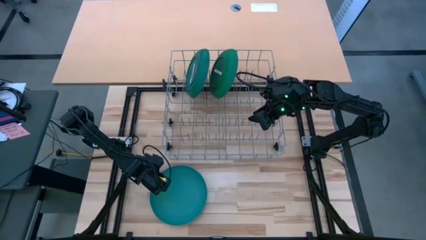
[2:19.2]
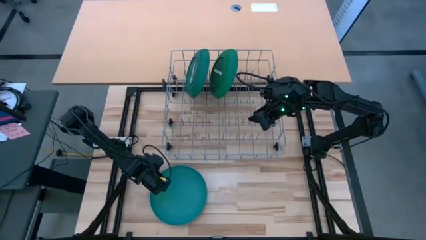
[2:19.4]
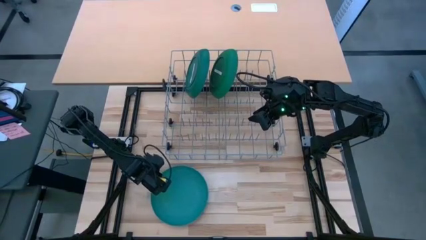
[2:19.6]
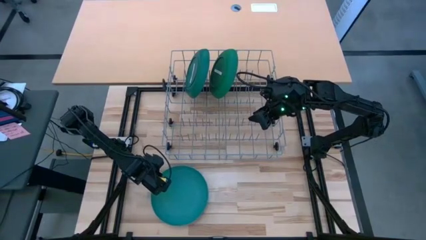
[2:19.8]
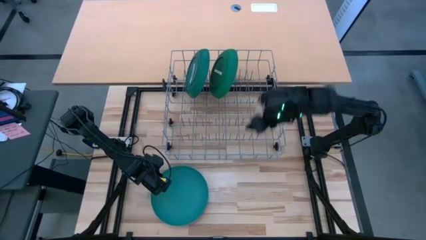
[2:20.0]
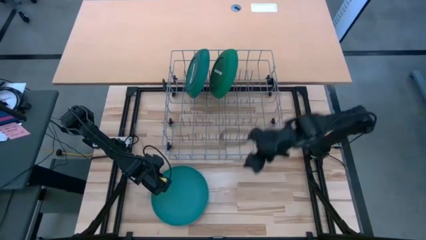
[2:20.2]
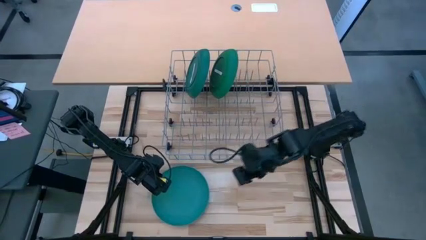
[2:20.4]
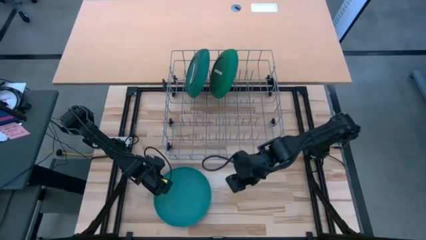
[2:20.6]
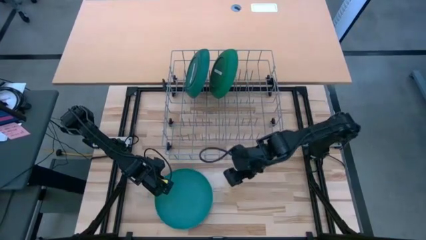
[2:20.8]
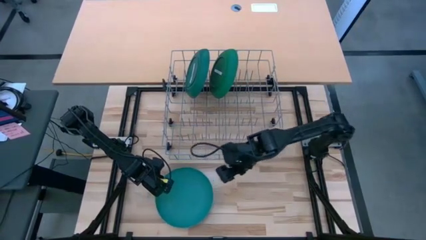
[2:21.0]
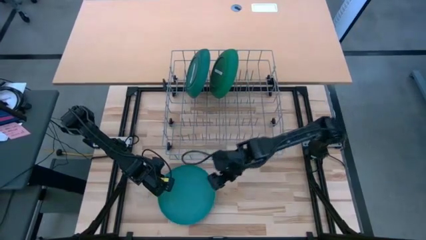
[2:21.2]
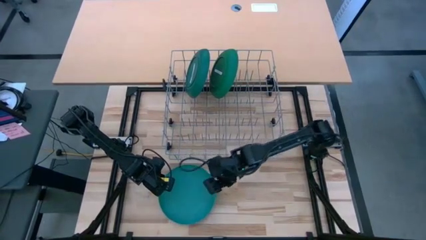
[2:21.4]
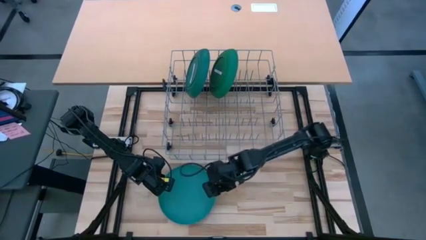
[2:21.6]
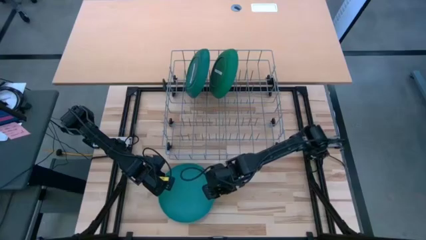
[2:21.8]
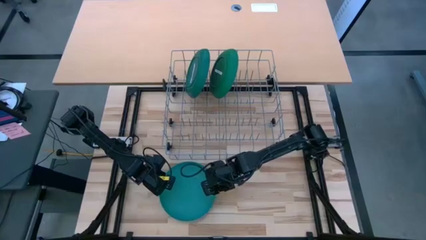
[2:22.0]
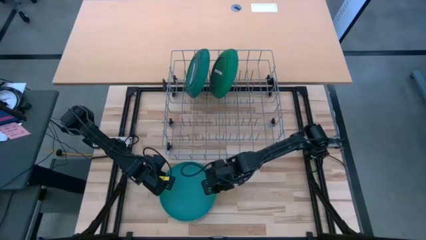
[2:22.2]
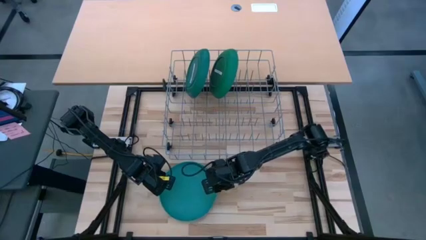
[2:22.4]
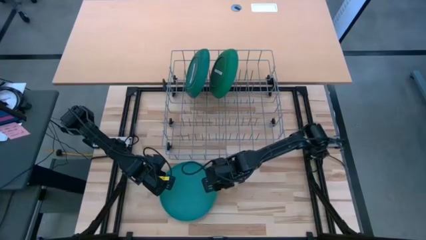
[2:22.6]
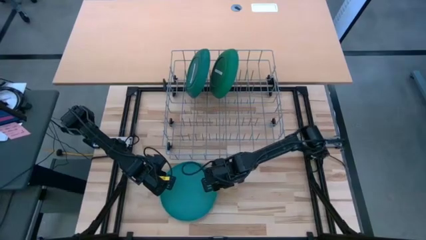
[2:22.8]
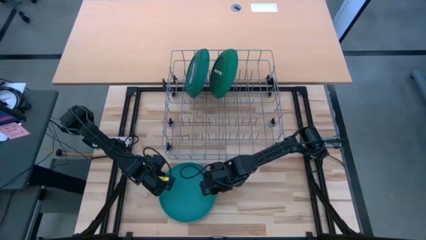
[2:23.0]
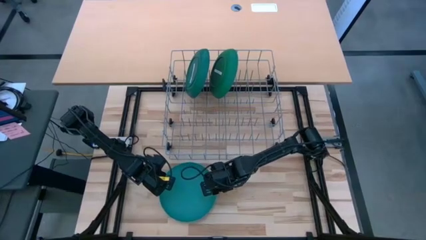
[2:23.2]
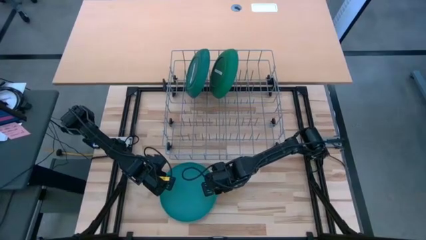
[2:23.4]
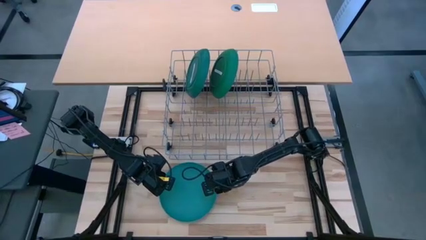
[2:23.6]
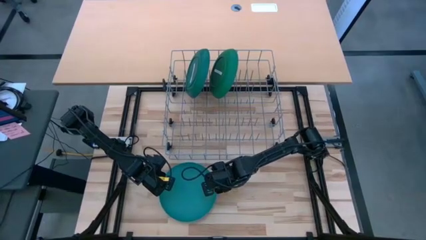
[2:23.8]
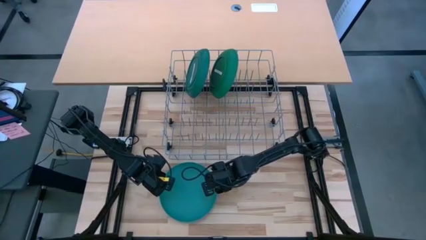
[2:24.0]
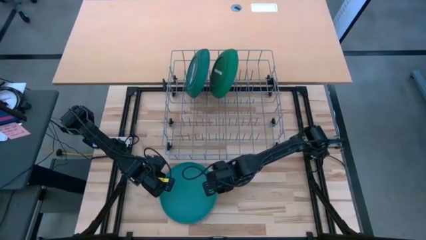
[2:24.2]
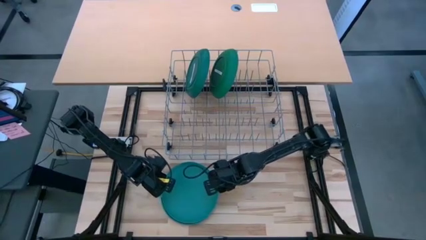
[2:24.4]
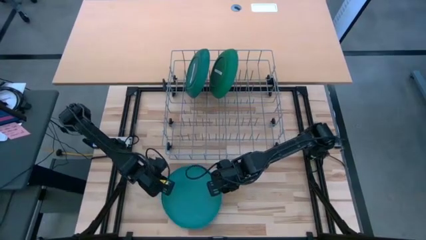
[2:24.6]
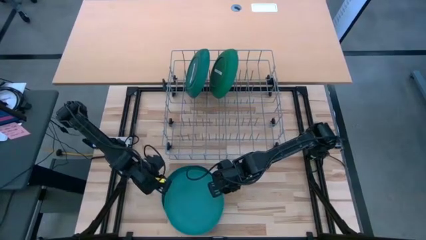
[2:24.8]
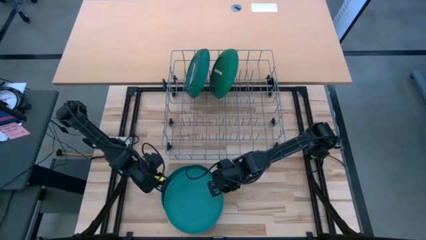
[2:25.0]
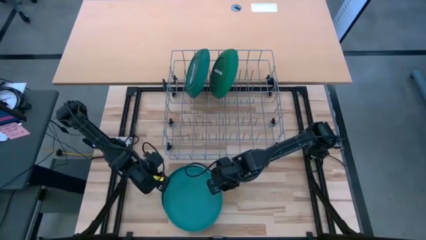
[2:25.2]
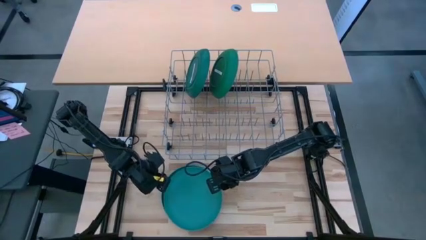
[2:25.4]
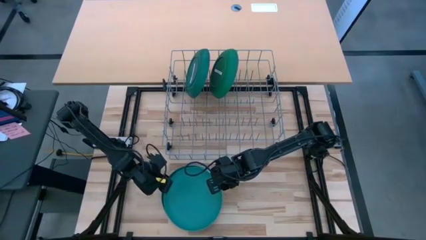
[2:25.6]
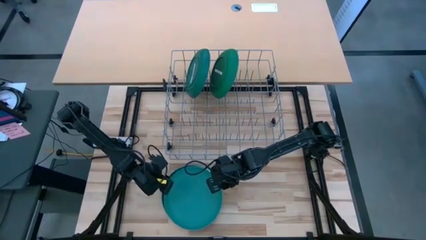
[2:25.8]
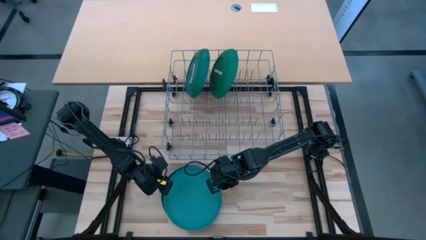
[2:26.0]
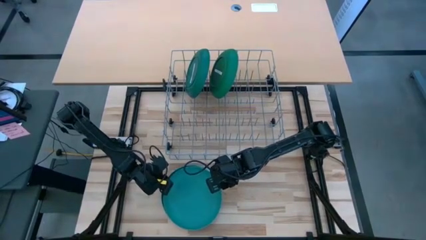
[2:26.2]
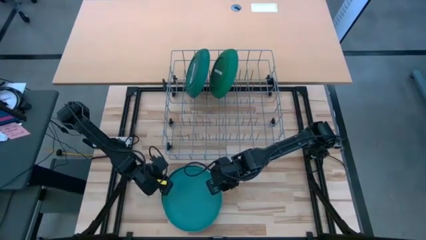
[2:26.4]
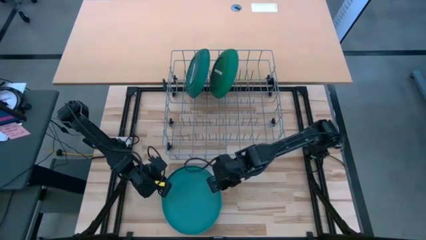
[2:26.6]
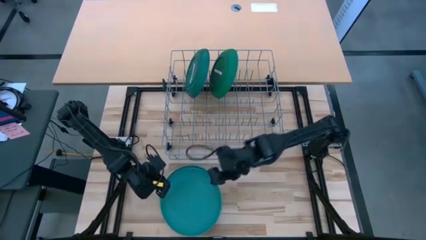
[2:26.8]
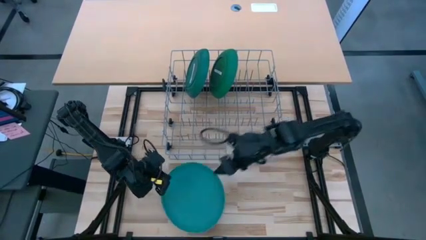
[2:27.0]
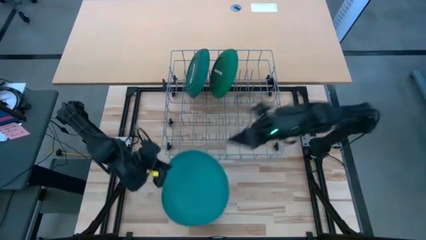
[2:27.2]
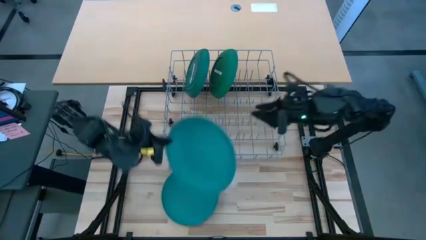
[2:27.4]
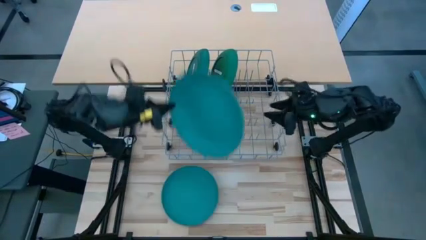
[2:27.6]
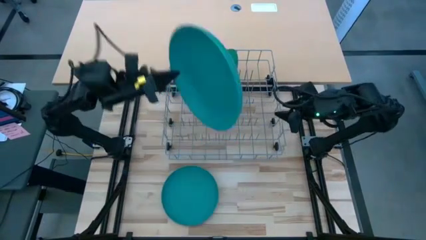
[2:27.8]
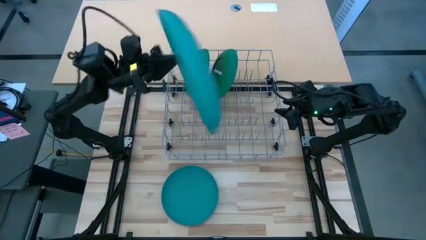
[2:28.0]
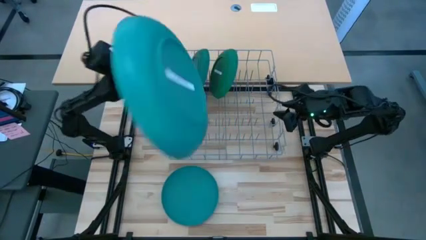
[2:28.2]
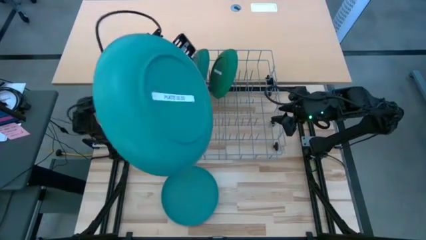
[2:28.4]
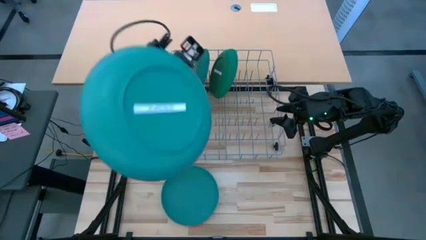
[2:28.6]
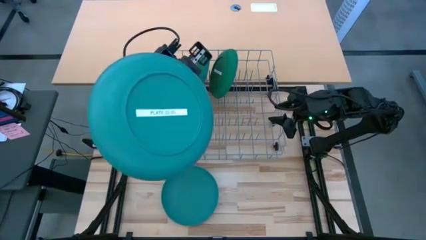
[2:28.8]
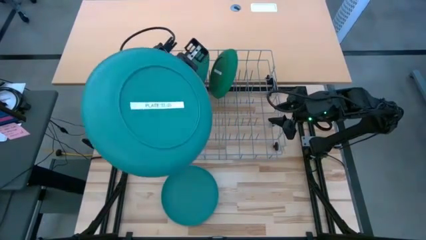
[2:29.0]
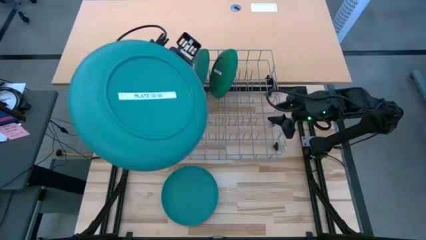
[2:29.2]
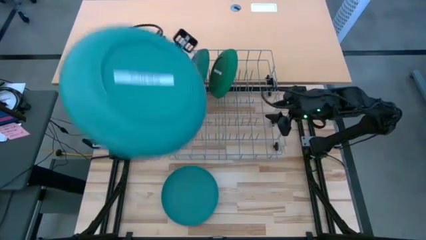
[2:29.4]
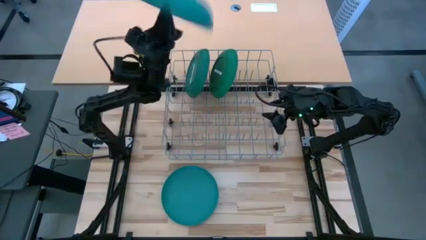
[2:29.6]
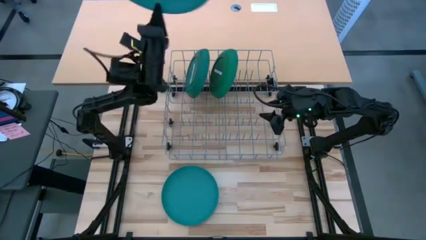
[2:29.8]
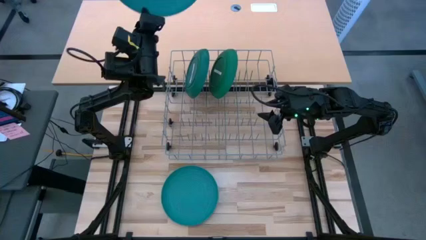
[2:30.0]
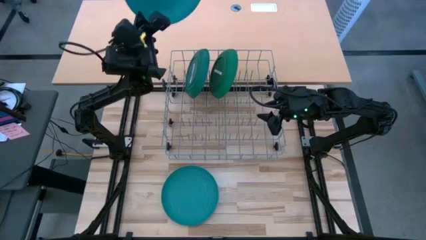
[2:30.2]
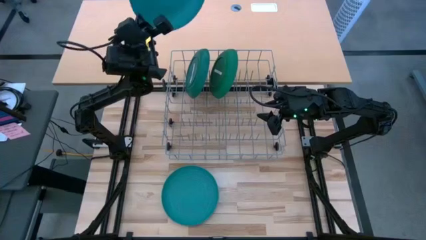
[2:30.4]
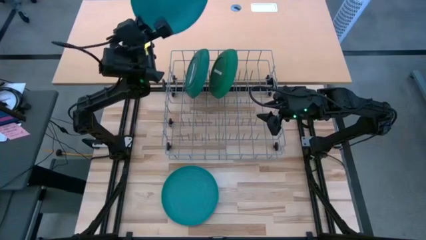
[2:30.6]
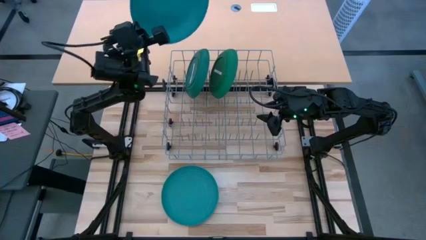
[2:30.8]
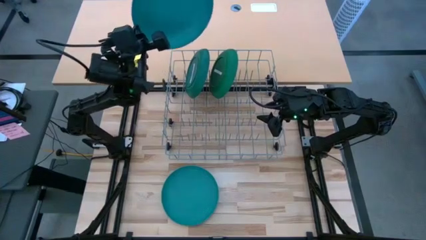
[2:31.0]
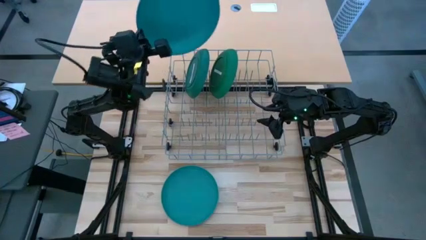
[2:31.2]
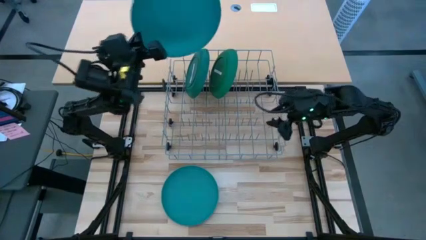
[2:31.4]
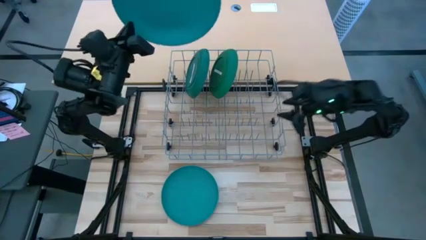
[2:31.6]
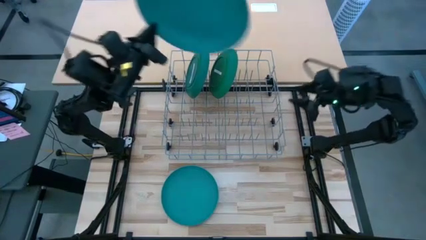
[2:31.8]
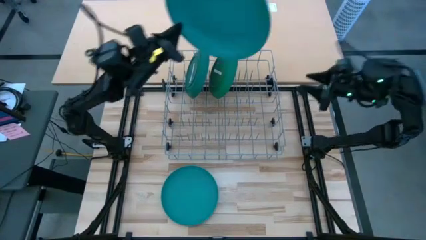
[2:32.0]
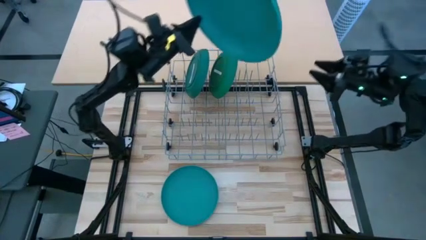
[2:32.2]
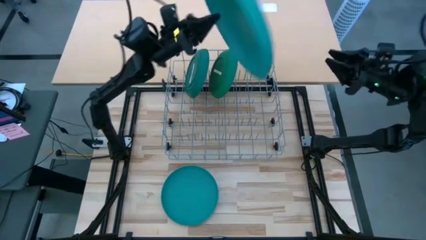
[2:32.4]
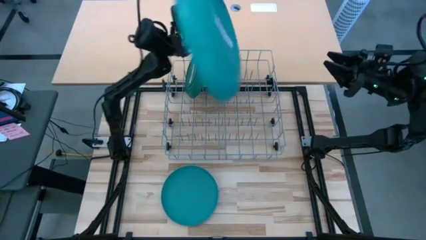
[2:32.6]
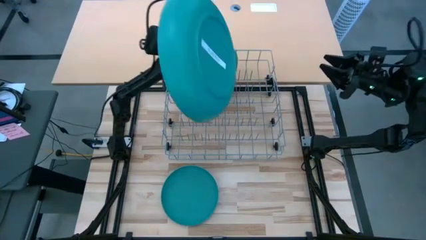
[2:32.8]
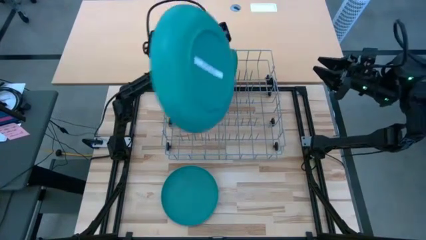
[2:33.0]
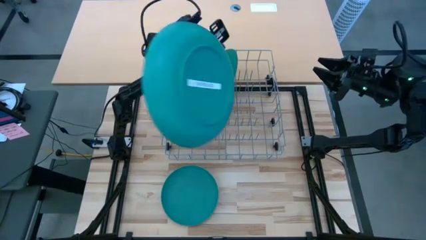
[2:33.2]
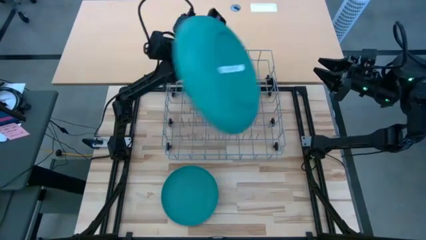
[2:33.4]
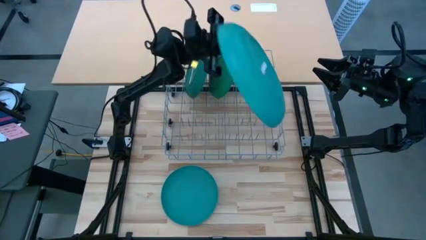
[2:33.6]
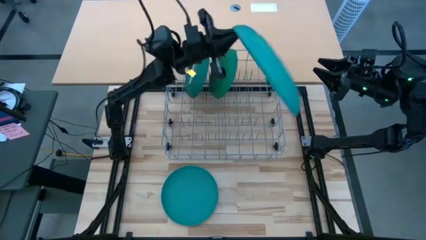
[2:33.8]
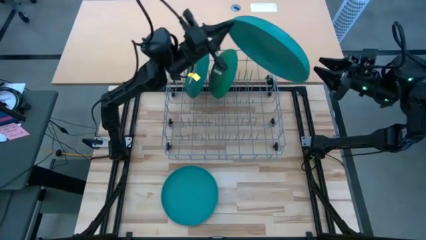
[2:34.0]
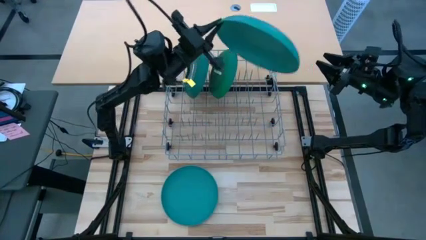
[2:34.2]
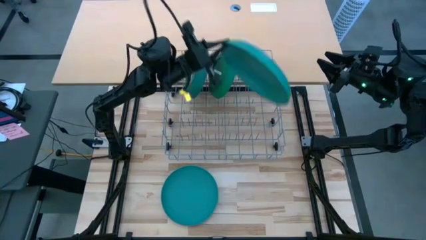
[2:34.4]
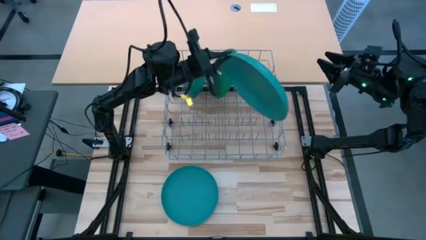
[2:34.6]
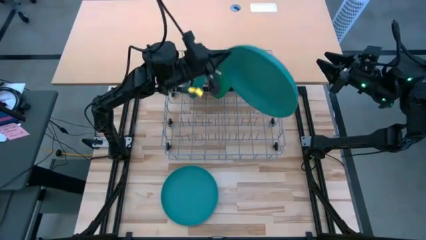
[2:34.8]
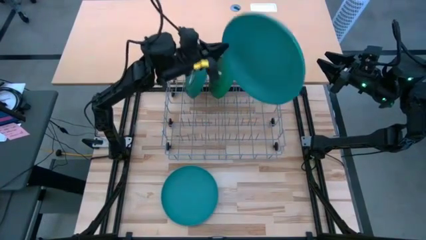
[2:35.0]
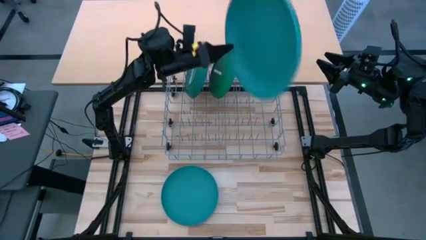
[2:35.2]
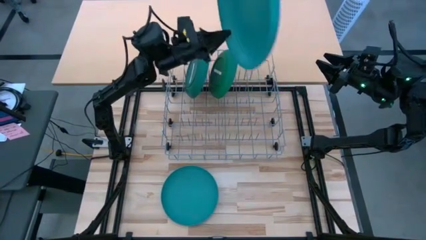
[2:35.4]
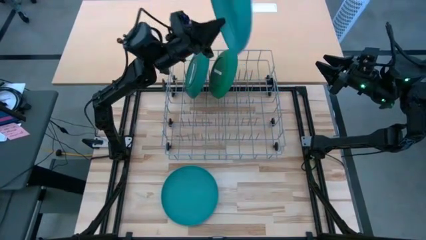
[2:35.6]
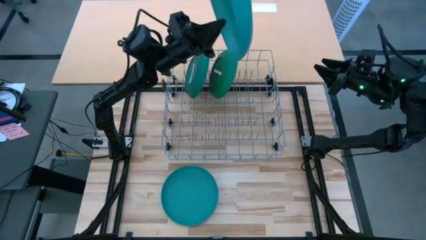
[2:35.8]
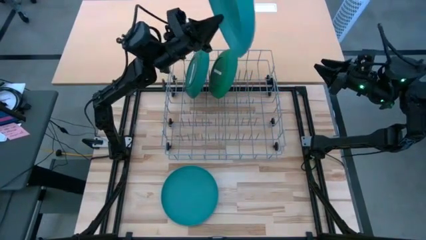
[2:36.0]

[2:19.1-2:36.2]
Task: Sort dishes
Put the blue plate into the dish rack
